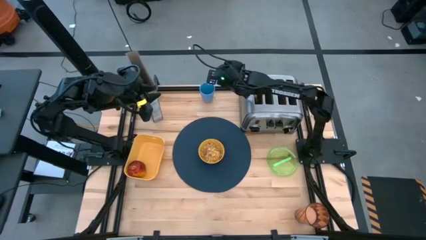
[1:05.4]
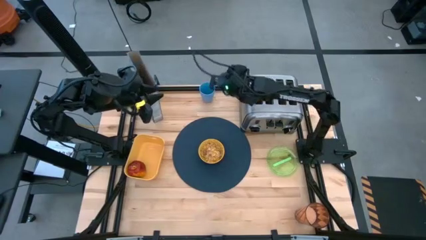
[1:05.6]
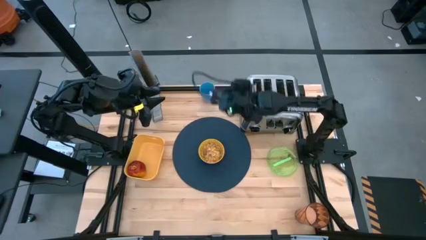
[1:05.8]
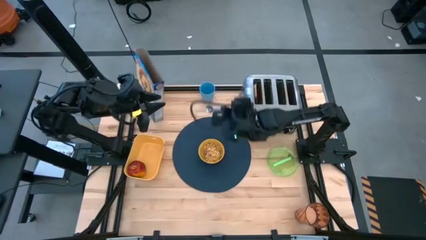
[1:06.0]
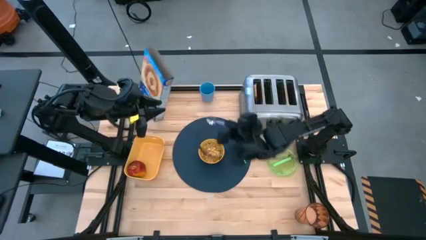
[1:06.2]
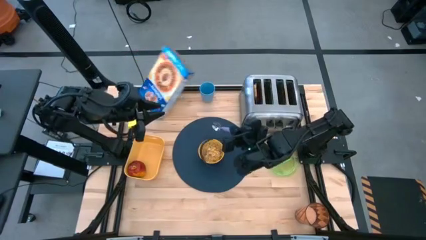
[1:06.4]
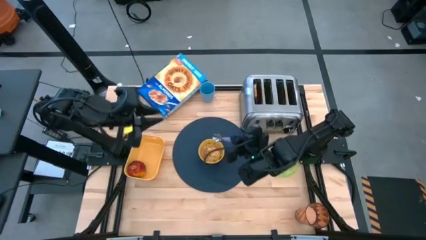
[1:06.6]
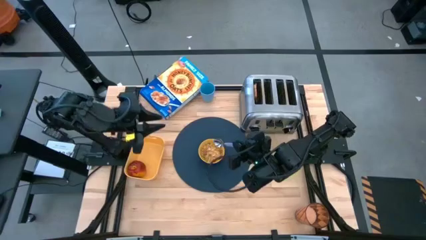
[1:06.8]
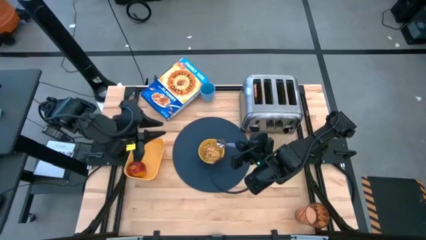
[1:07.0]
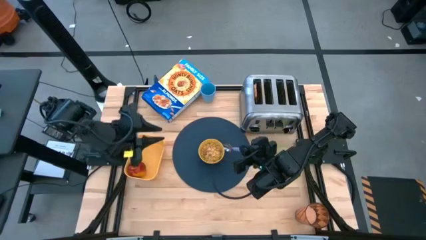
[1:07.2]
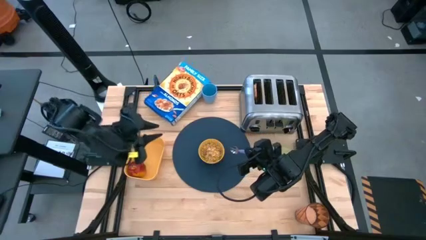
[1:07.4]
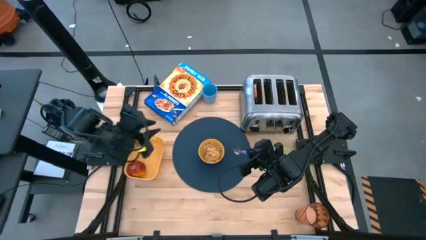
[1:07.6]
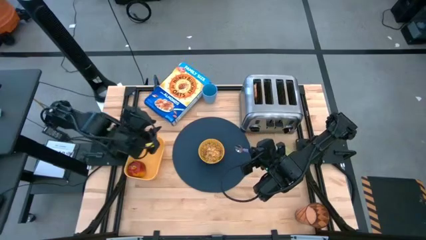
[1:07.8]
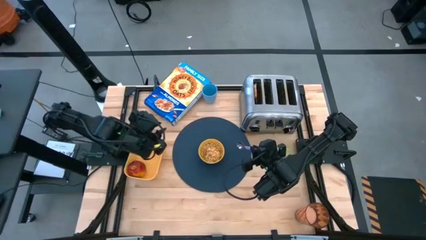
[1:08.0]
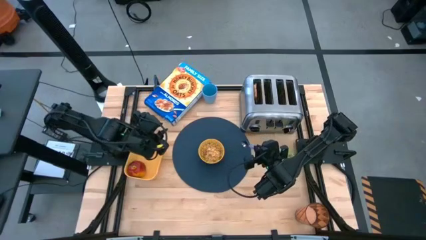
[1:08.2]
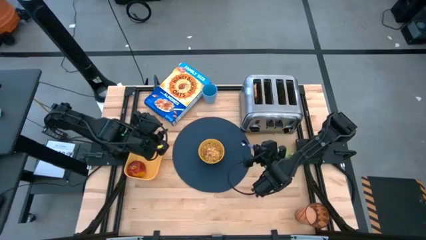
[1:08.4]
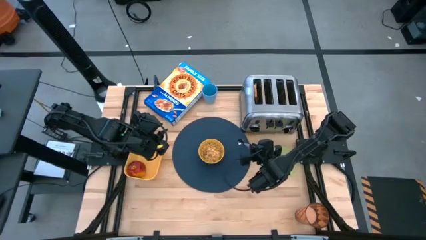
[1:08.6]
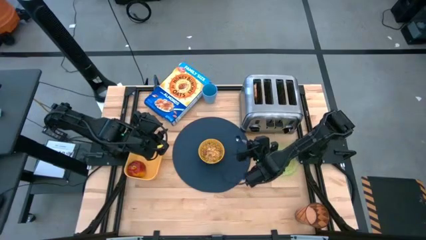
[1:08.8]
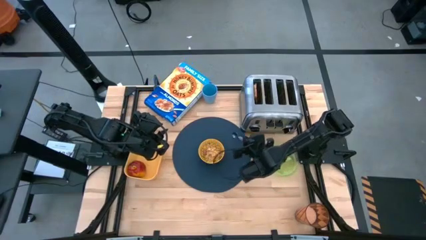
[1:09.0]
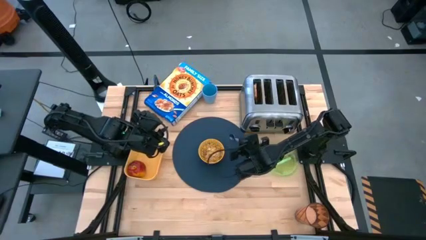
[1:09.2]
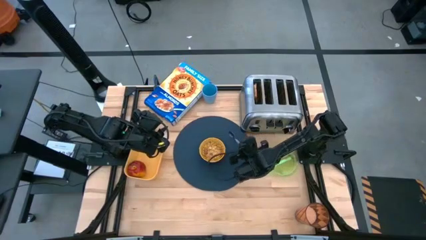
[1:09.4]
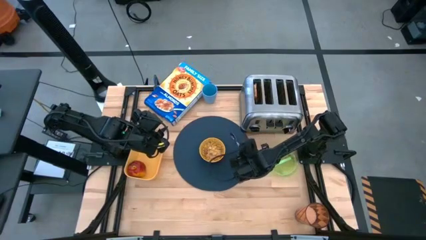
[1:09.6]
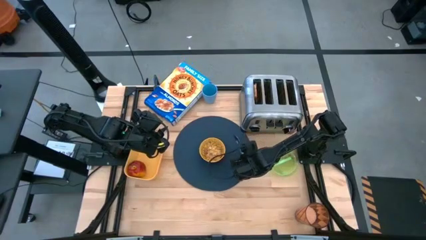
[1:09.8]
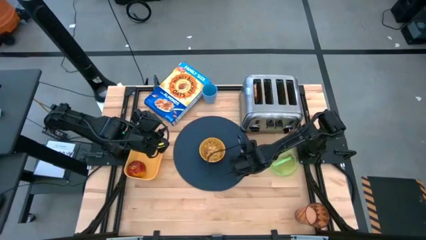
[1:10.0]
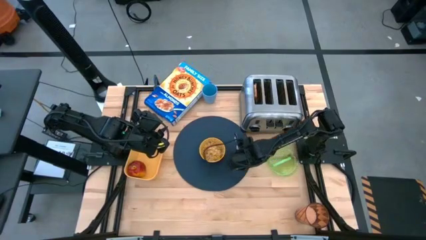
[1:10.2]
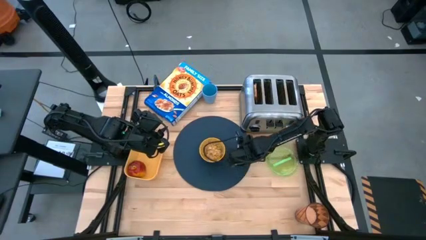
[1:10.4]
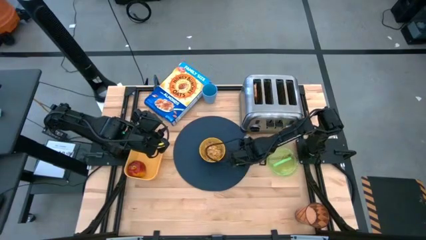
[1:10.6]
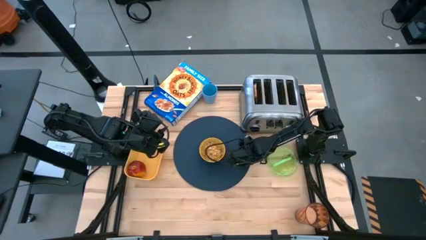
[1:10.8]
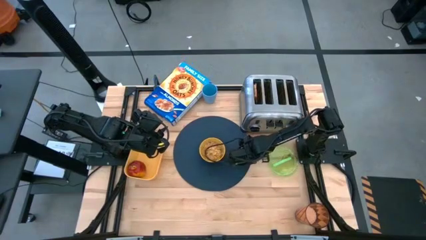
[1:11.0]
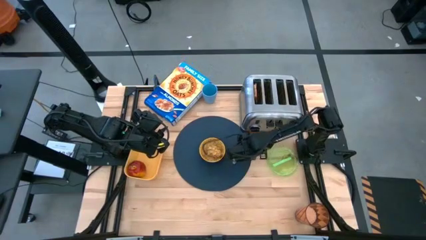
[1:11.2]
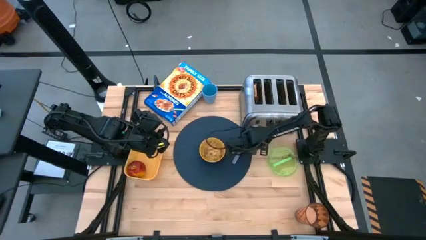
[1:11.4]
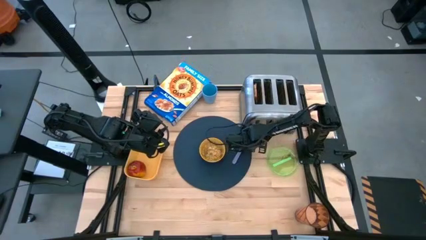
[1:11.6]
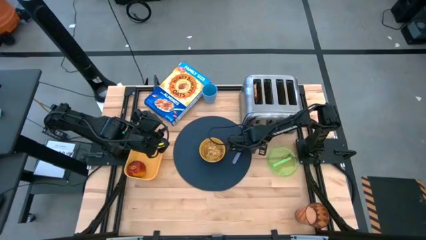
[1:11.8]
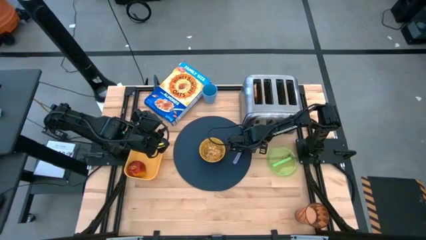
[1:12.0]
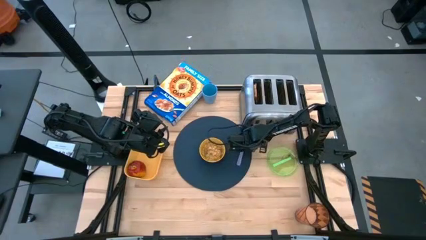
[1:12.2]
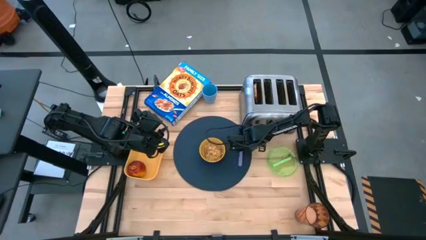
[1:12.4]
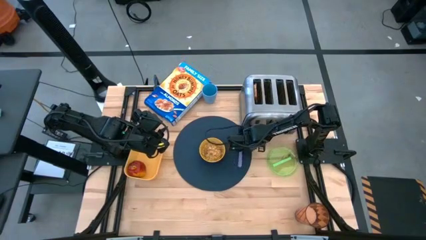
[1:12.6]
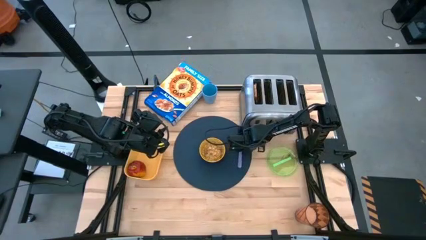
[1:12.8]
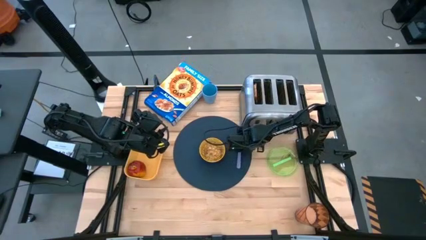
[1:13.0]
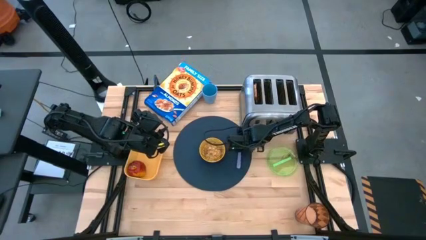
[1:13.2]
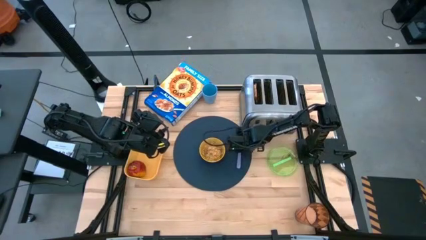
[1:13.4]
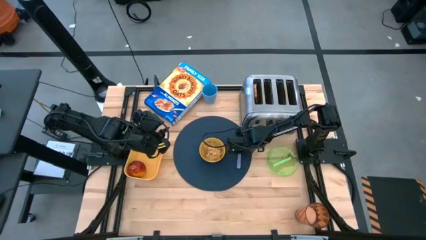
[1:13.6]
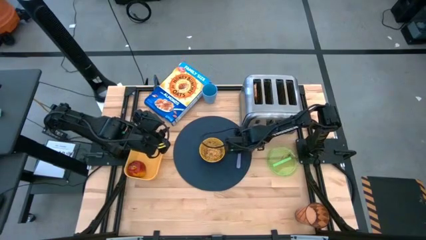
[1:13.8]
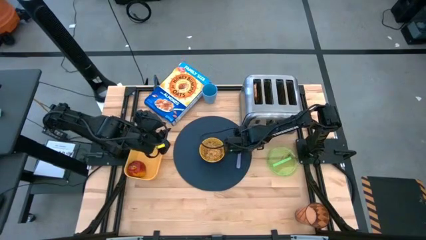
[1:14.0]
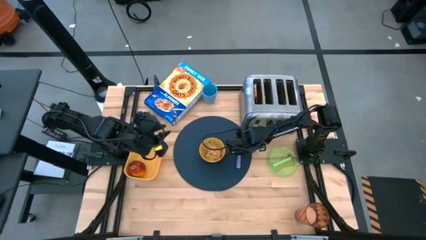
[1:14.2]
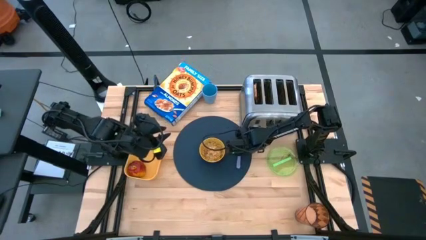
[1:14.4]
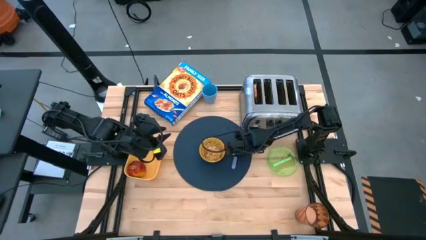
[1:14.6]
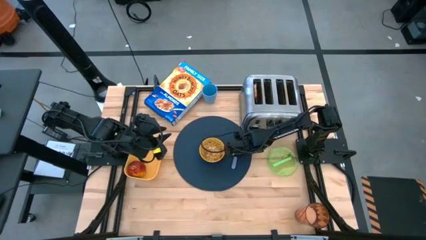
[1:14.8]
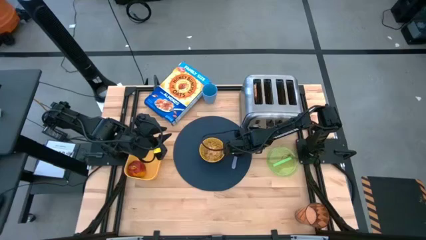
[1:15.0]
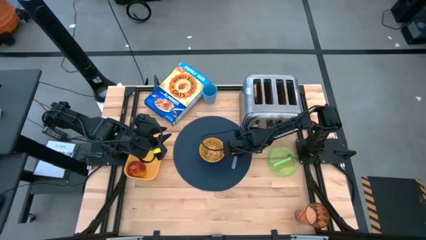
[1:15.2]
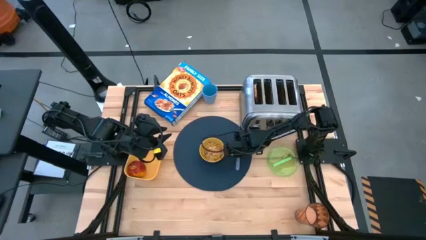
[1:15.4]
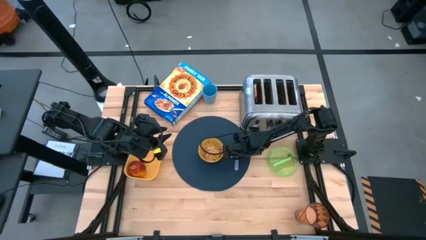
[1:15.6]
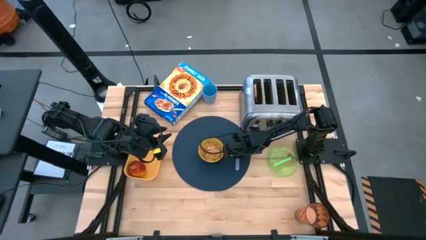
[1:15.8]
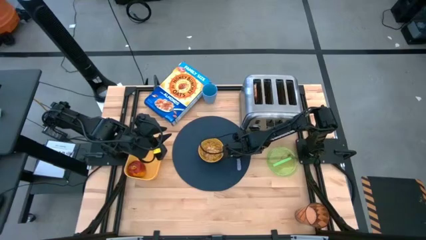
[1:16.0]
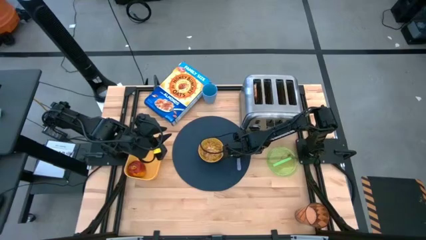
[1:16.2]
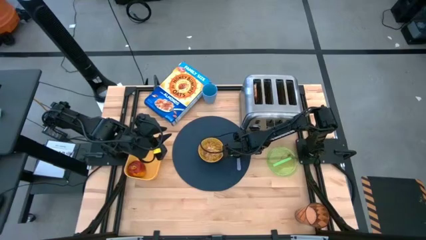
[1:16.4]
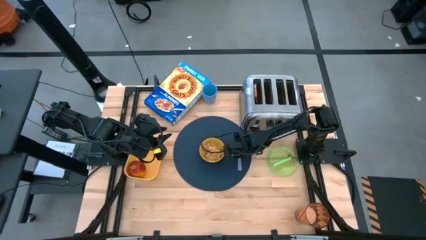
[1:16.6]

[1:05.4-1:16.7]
Task: Arrange a breakfast setting
Put the spoon on the mat to the right of the bowl

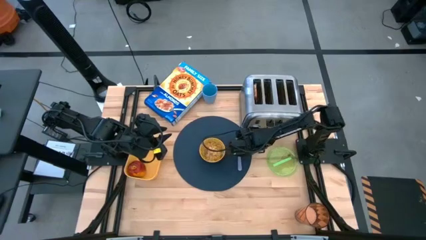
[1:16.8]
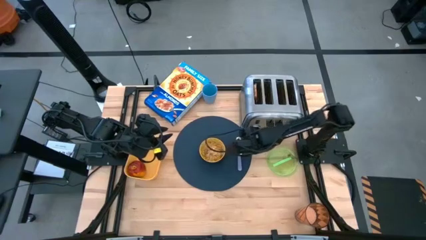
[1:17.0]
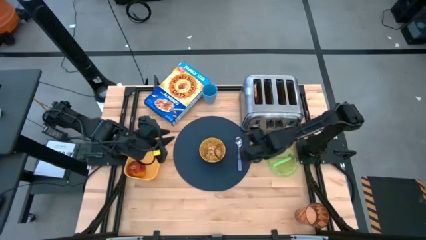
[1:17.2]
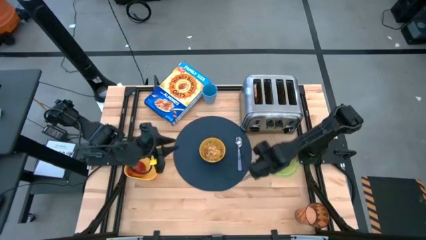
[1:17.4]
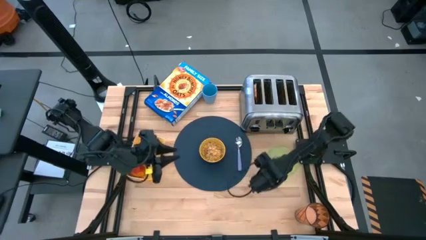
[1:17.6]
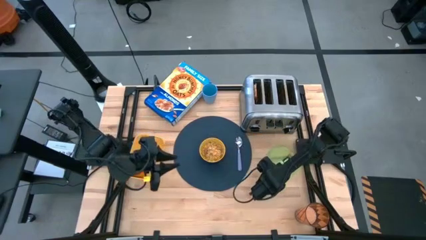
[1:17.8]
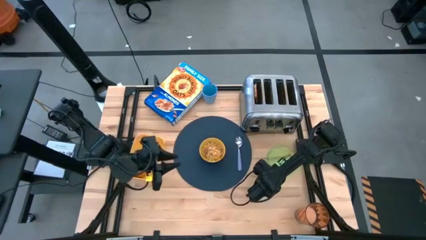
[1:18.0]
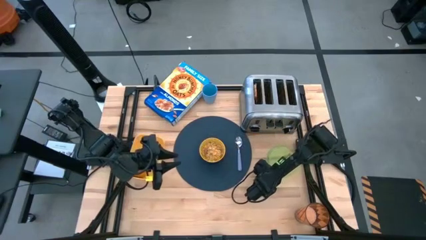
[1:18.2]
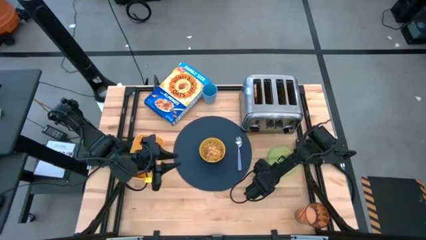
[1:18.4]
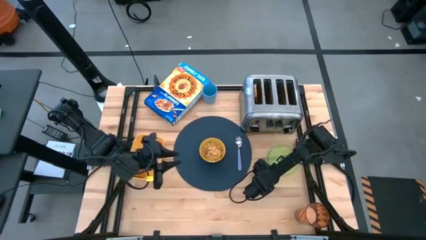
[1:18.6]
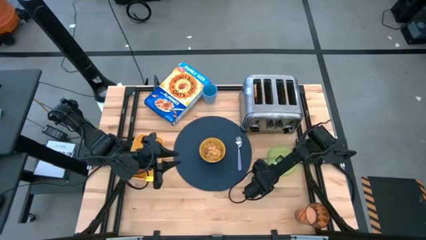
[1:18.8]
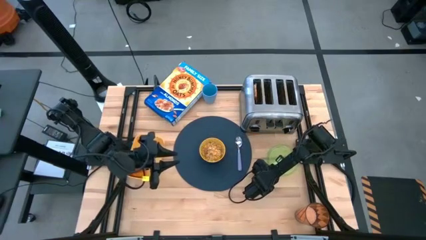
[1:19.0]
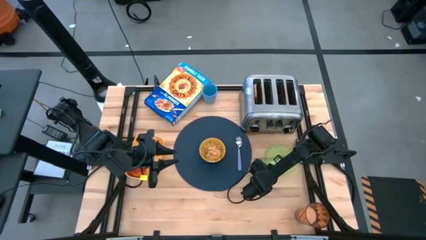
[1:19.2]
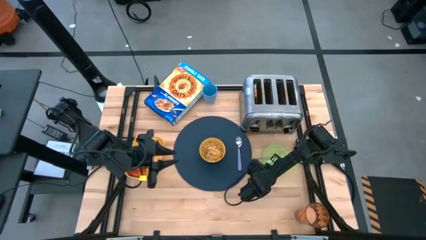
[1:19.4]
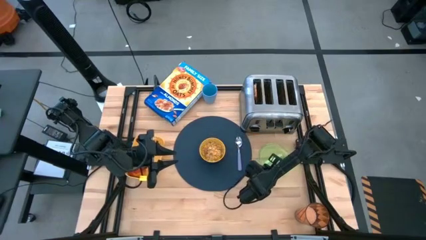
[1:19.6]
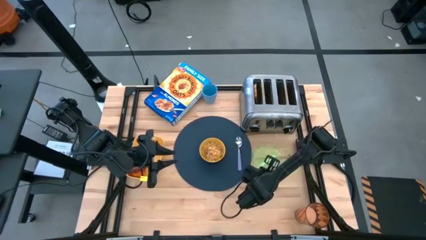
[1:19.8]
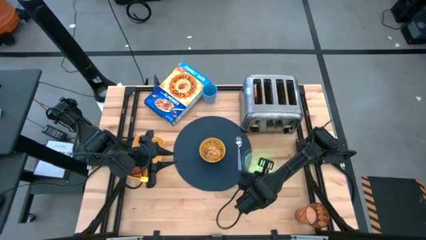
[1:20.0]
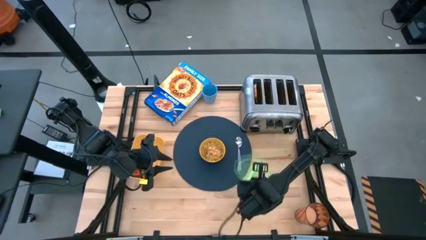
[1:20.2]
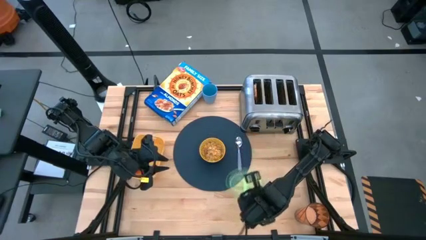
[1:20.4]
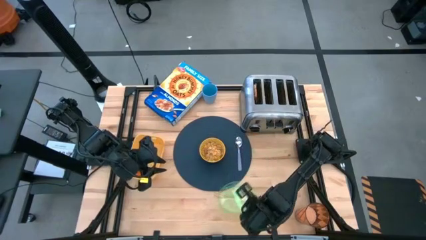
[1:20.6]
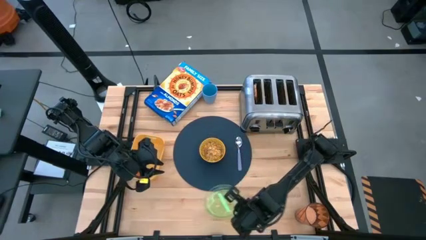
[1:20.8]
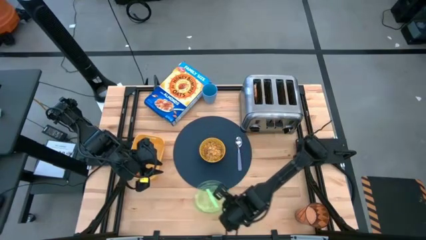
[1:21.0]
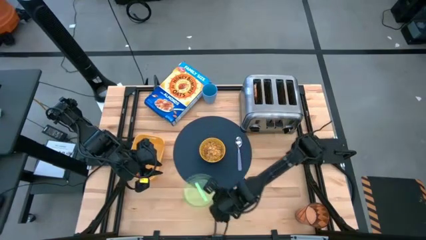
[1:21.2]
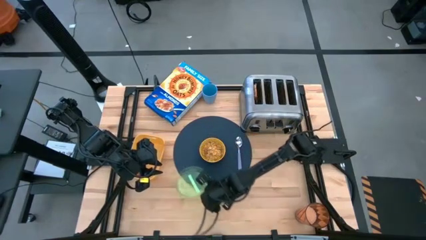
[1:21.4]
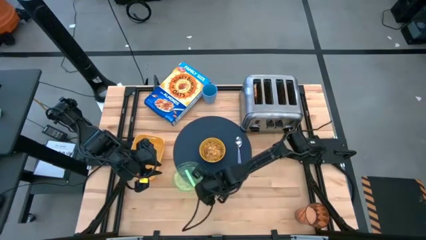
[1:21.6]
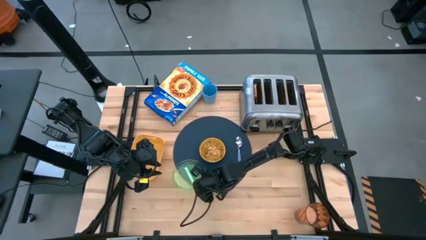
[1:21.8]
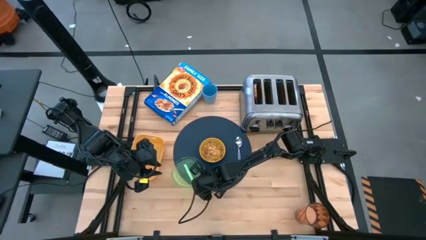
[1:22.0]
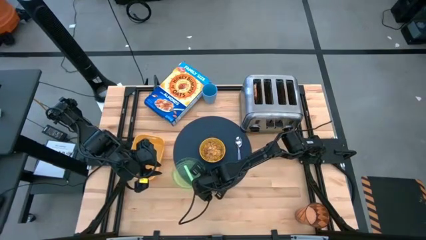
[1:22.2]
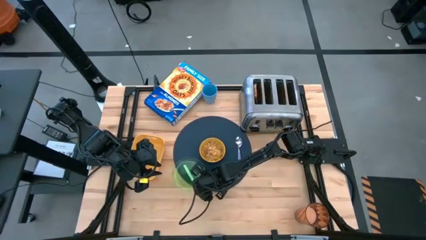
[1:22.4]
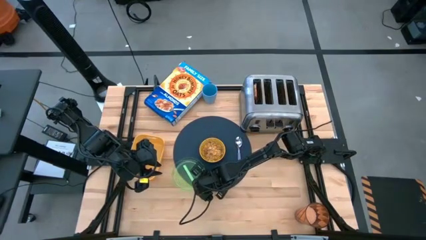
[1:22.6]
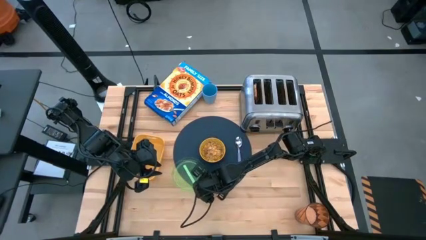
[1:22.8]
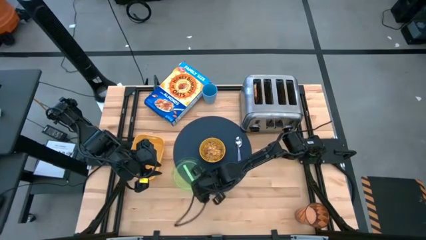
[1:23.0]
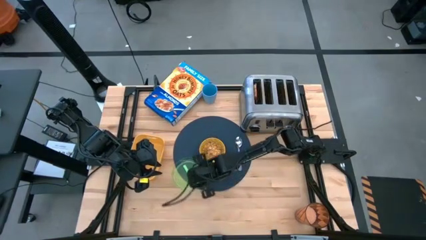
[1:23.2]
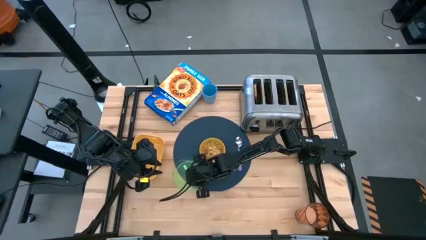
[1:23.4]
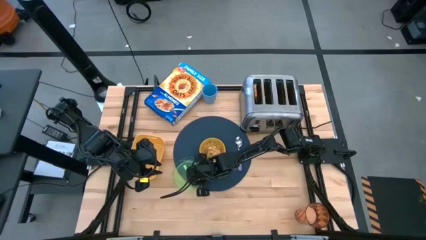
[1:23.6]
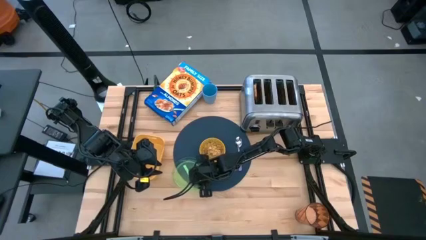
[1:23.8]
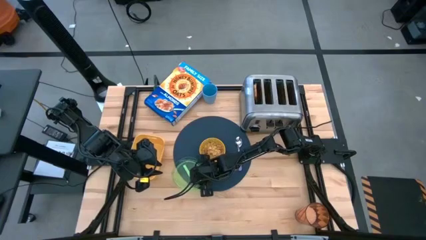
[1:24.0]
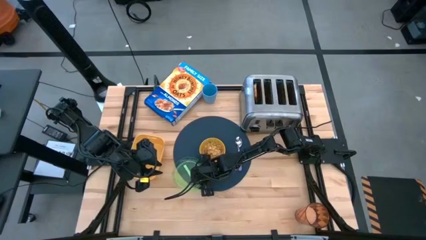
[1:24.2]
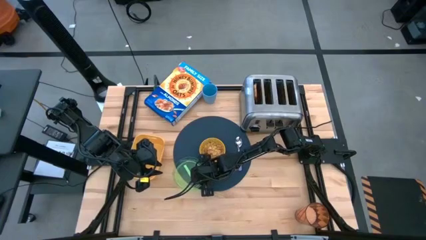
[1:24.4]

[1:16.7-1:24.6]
Put the plate on the mat to the bottom left of the bowl
